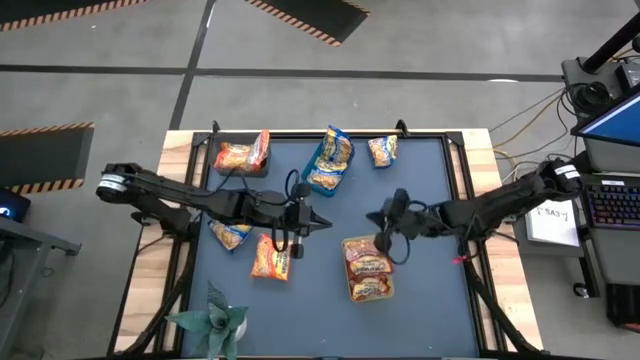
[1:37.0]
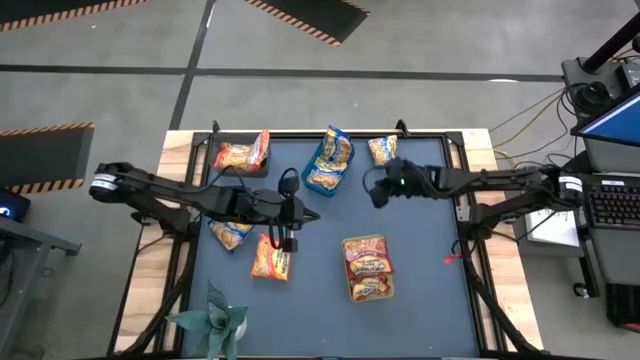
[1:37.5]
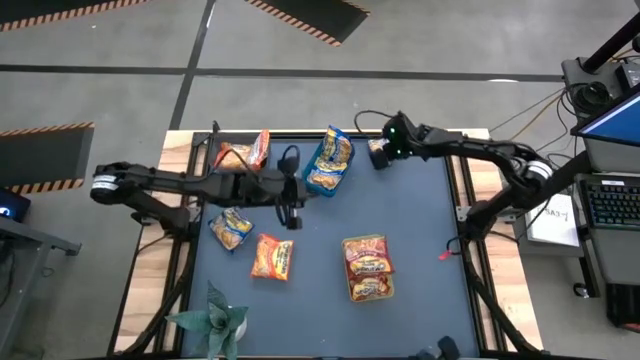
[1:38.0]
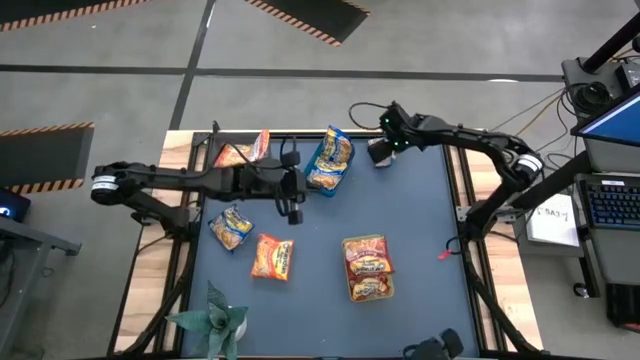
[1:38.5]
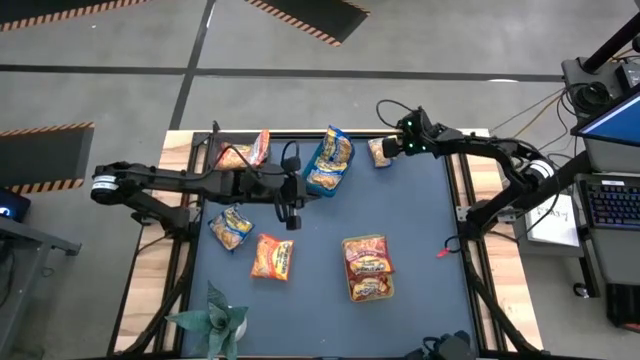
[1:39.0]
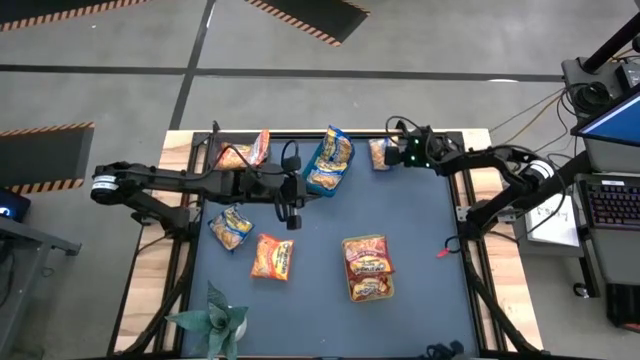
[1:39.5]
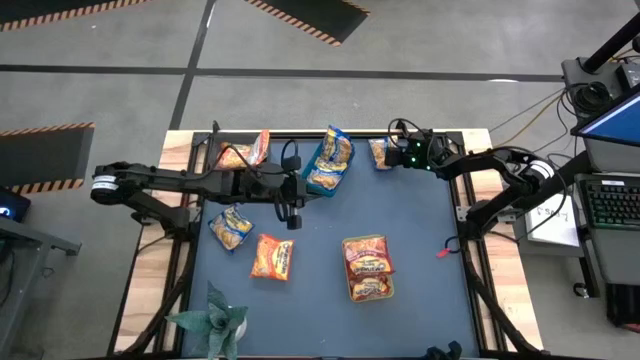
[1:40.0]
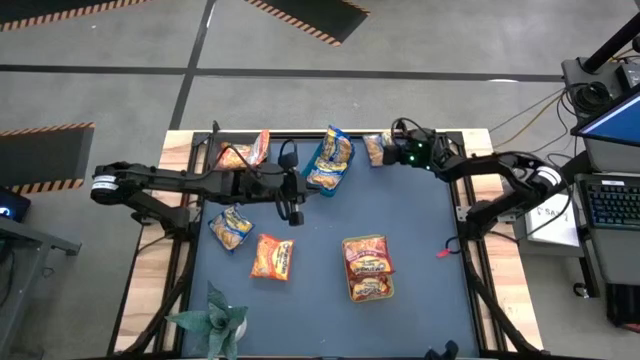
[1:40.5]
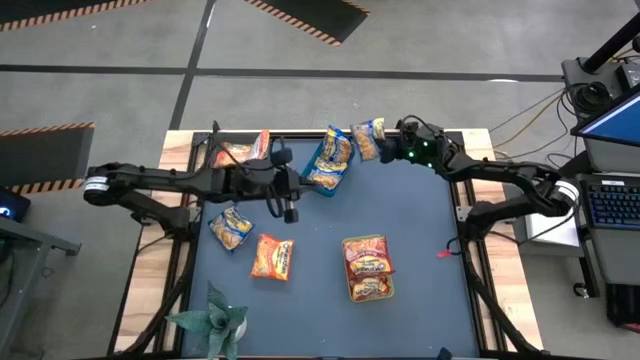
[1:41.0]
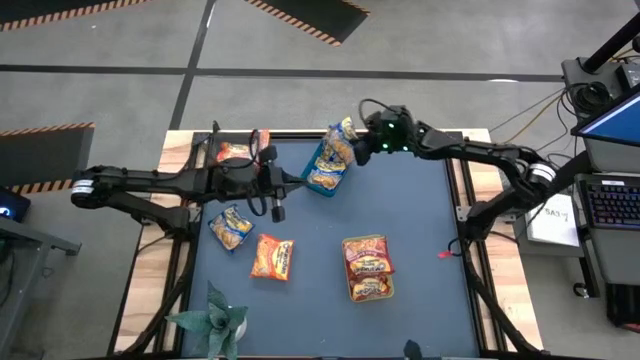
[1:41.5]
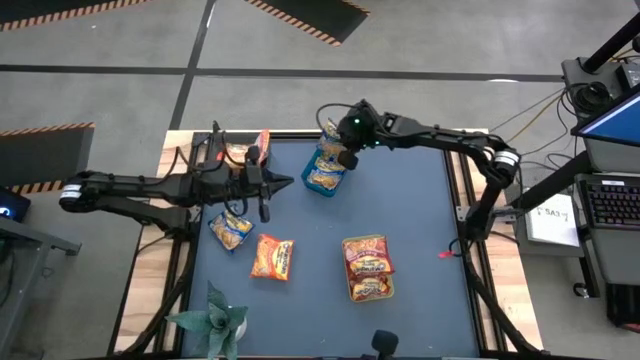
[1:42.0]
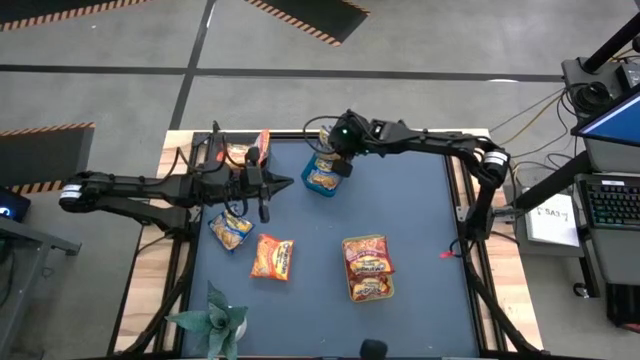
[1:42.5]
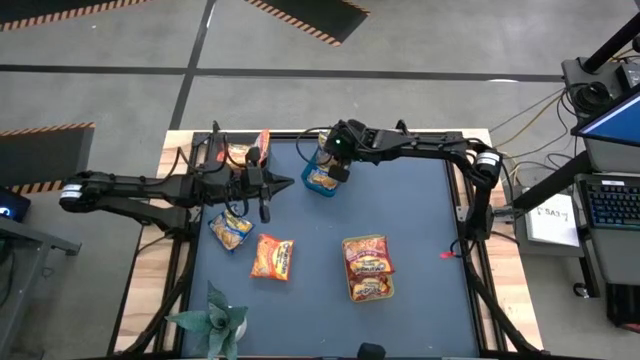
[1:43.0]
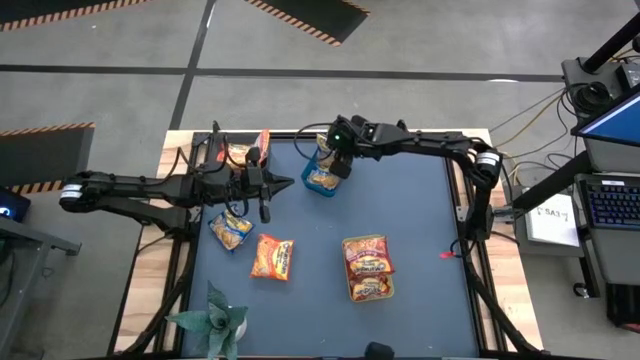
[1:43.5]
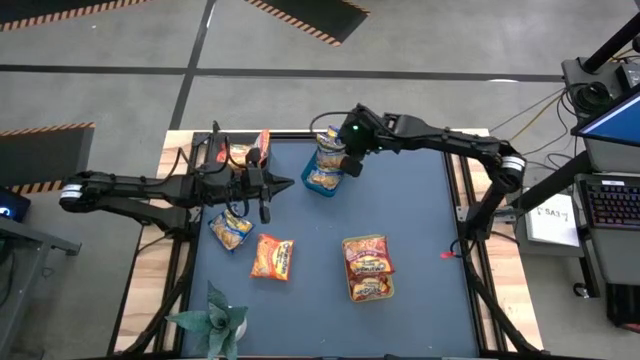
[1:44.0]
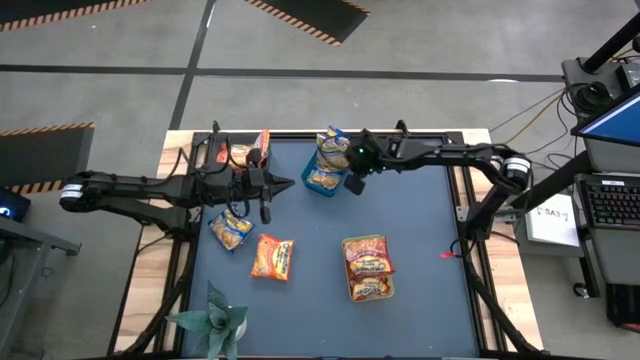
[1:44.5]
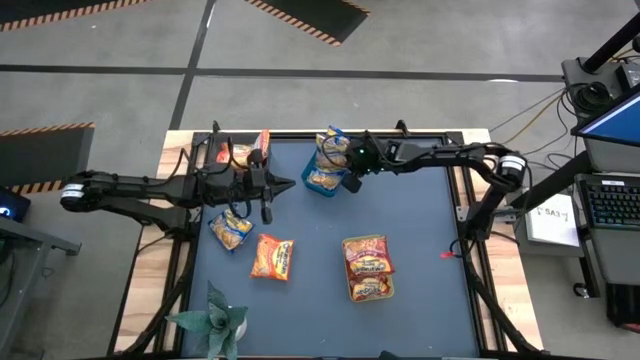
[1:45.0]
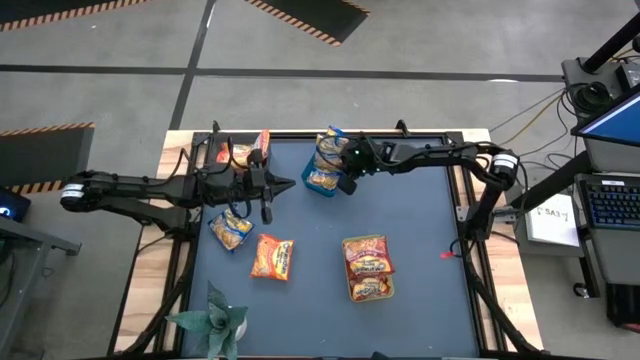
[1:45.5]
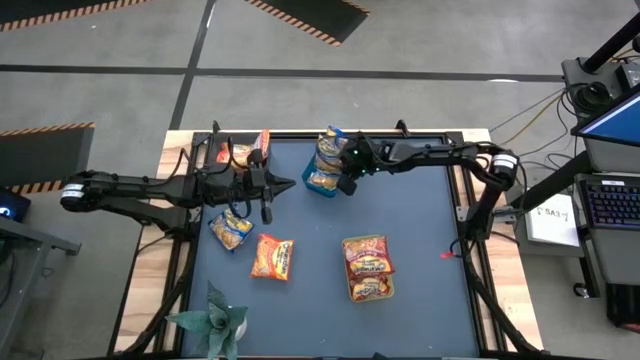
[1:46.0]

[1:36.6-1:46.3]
Task: Sort Maruchan noodles
Put the blue noodle pack into the blue bin

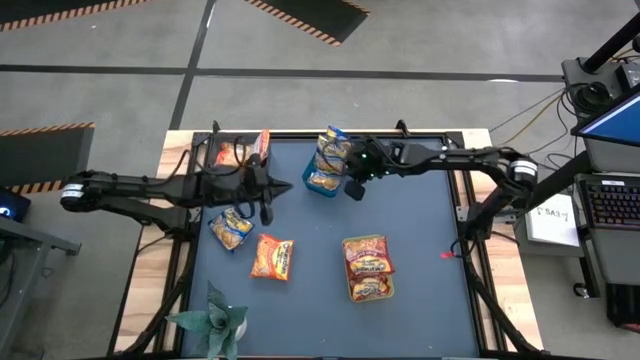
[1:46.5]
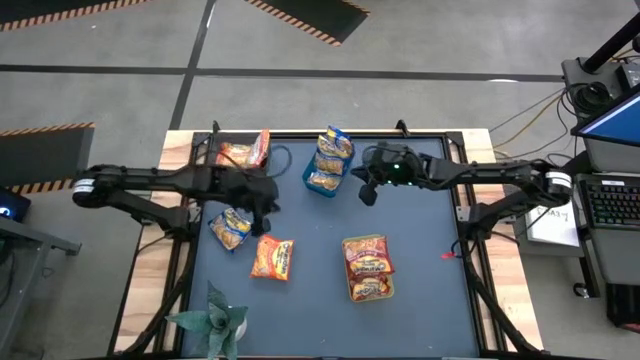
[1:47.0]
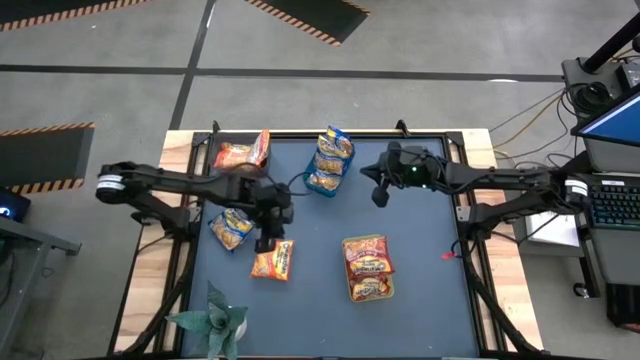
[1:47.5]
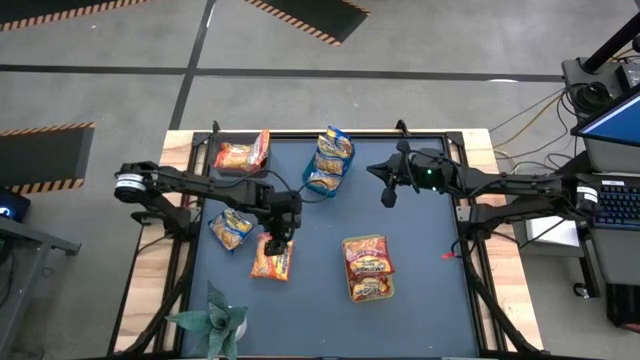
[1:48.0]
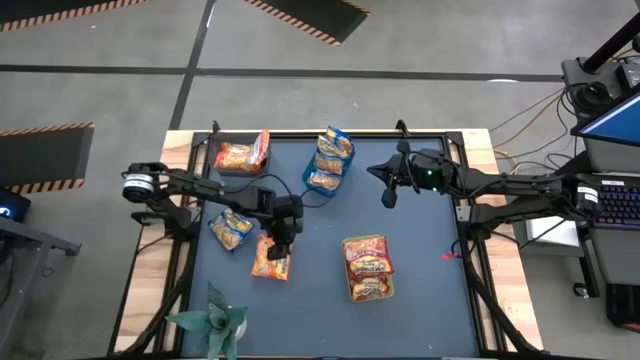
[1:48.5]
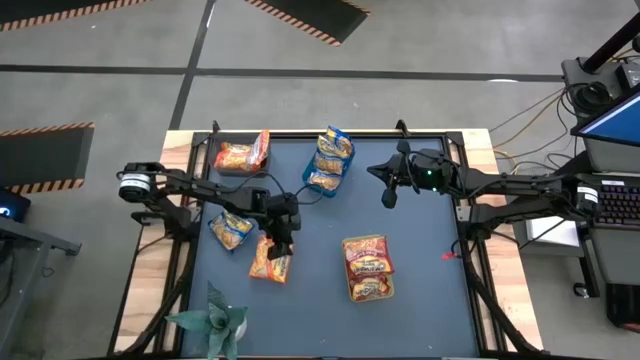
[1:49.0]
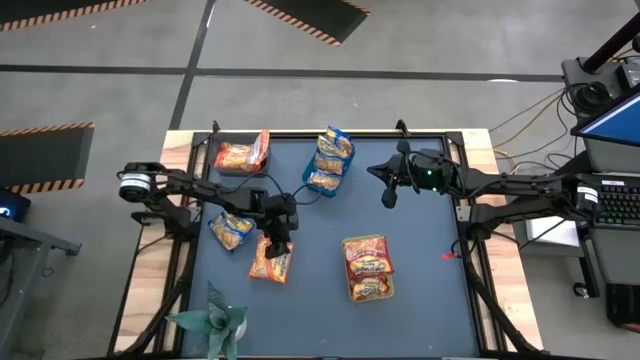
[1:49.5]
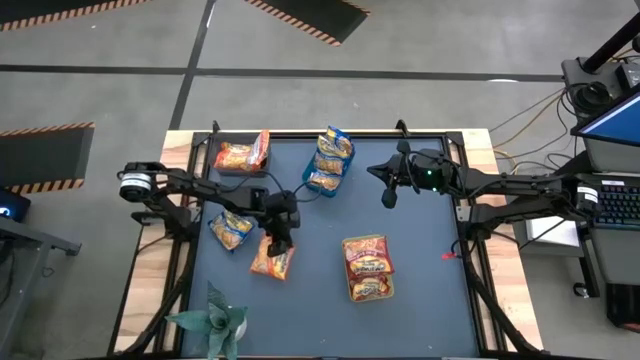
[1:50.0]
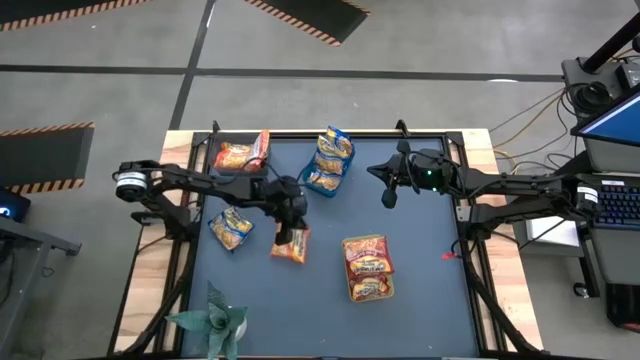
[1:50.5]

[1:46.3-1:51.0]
Put the orange noodle pack into the black bin

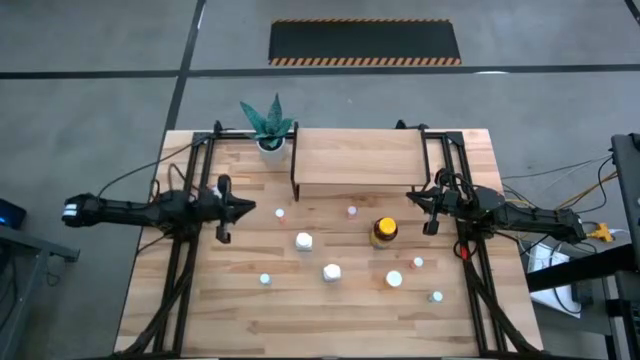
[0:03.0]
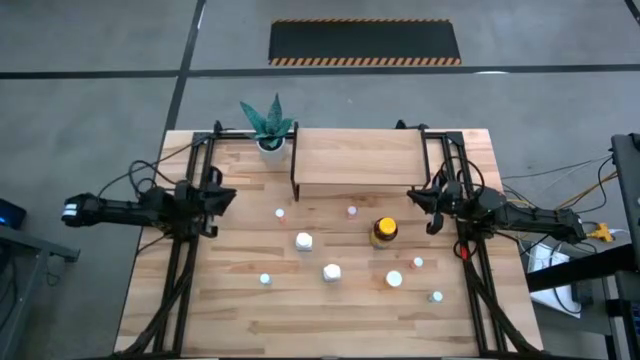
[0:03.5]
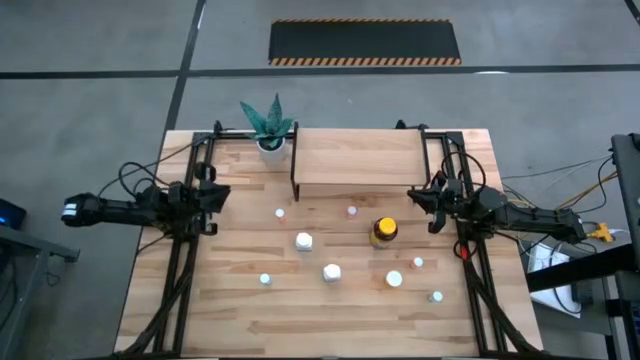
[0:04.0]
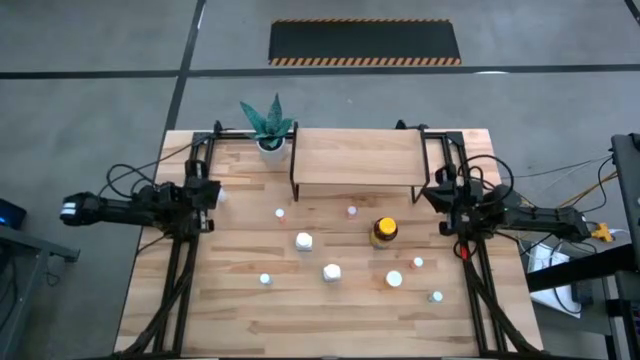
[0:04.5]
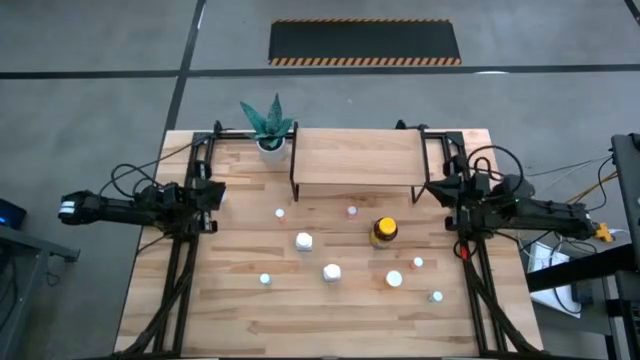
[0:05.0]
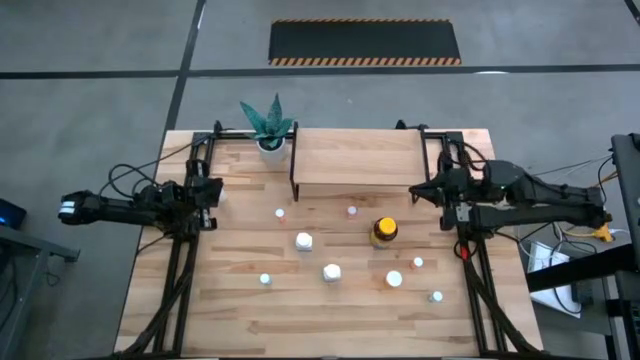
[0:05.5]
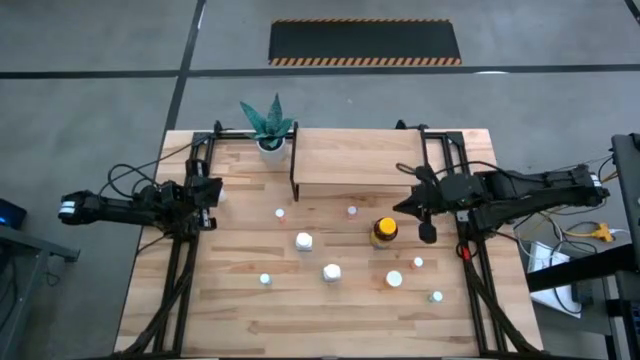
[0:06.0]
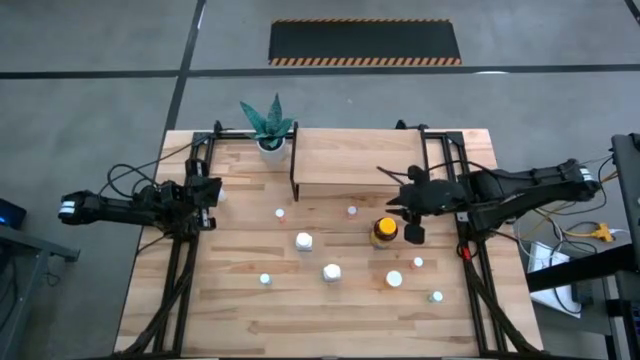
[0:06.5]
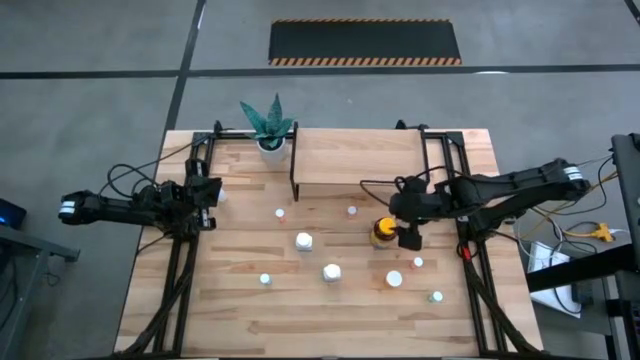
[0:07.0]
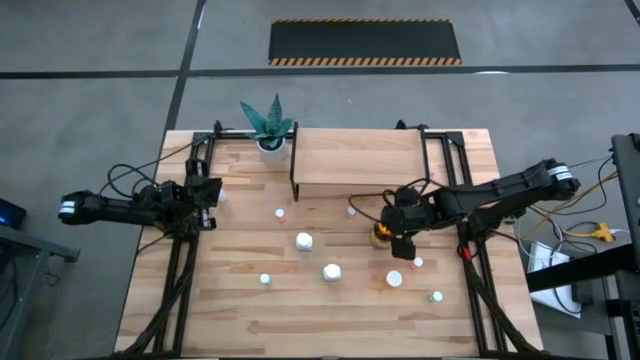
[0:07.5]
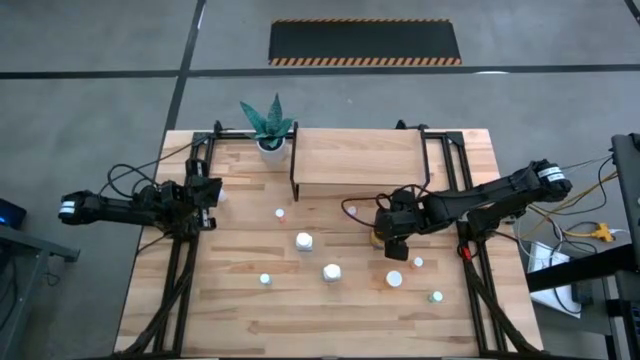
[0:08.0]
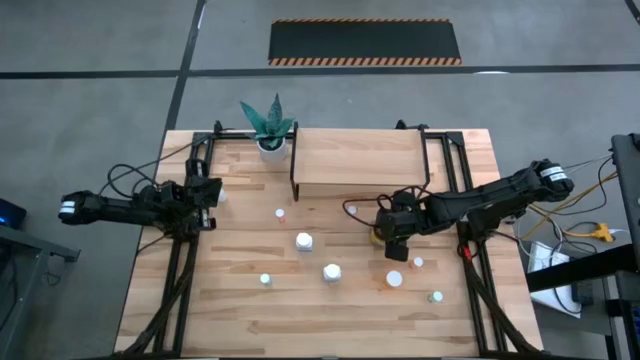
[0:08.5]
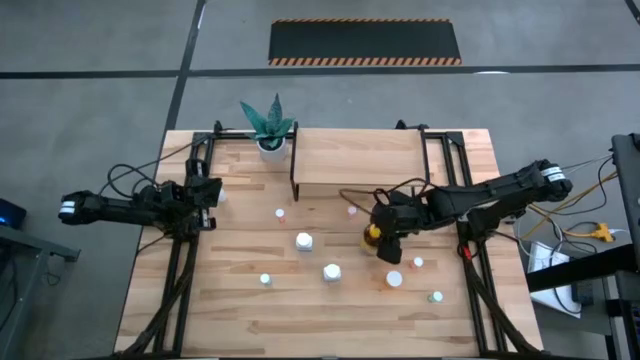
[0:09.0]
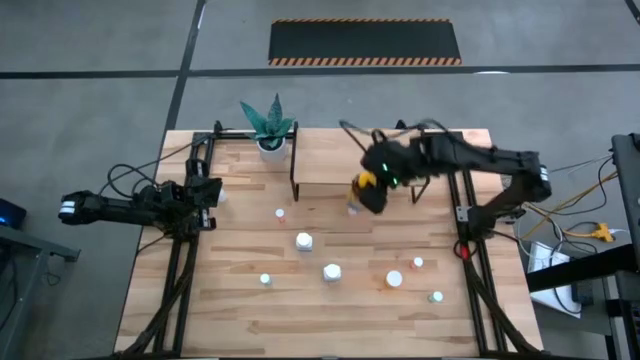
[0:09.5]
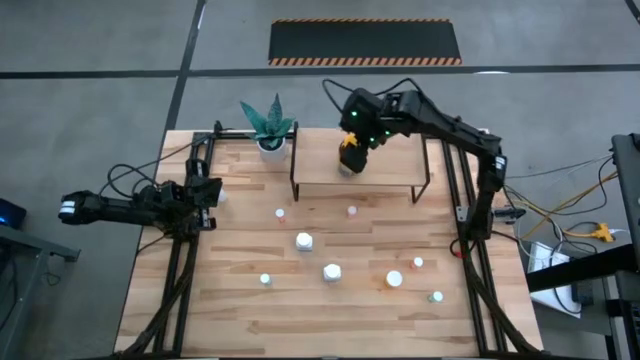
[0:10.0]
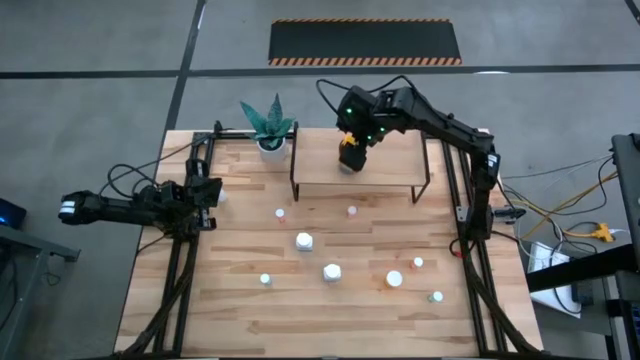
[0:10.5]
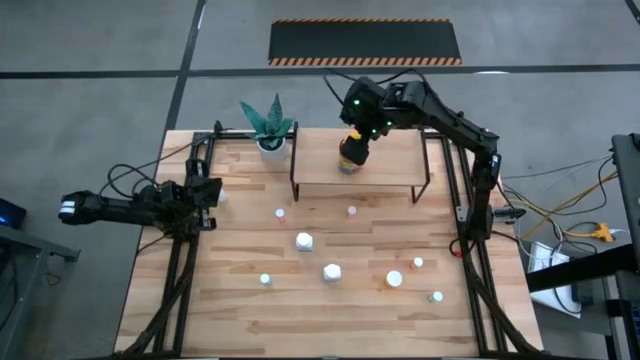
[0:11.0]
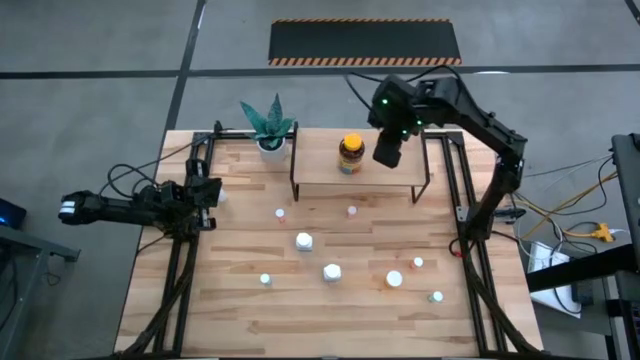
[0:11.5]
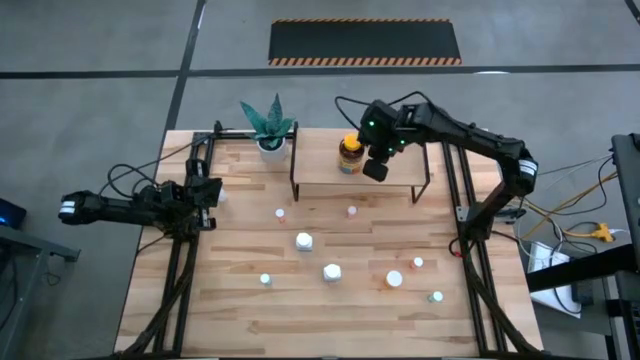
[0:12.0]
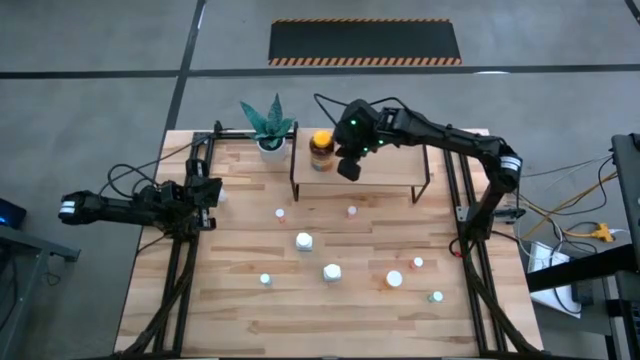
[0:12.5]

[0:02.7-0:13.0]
Task: Pick and place medicine bottles onto shelf by color
Put the yellow medicine bottle on the shelf
